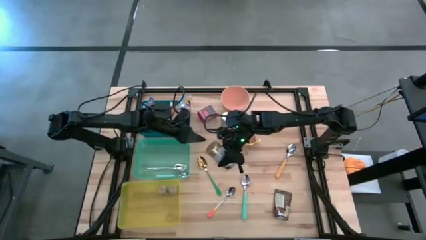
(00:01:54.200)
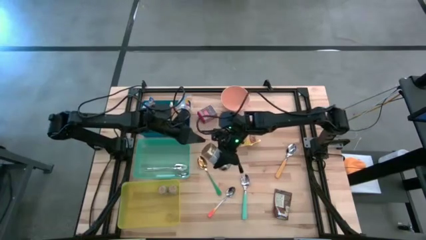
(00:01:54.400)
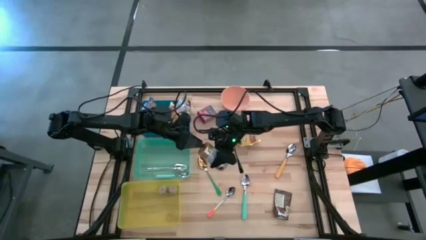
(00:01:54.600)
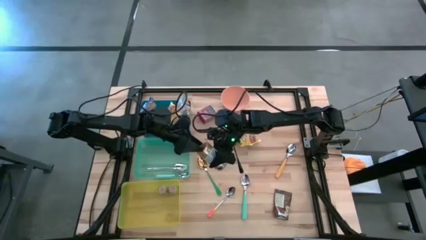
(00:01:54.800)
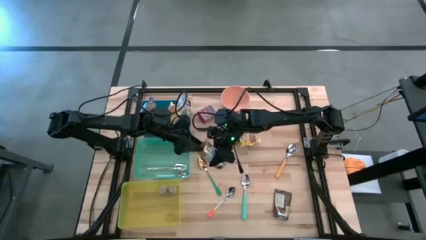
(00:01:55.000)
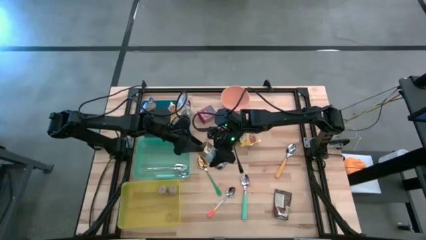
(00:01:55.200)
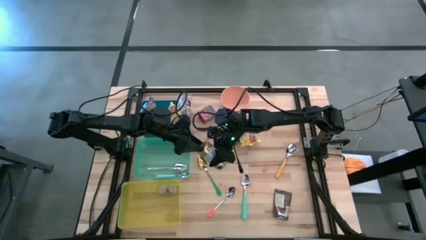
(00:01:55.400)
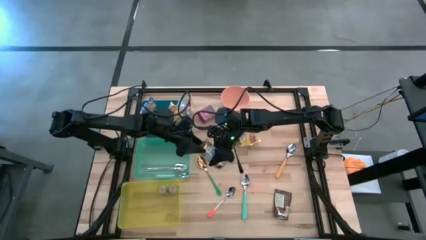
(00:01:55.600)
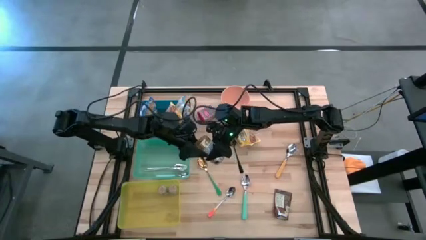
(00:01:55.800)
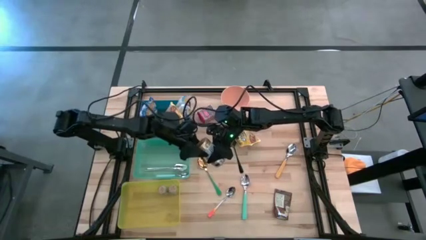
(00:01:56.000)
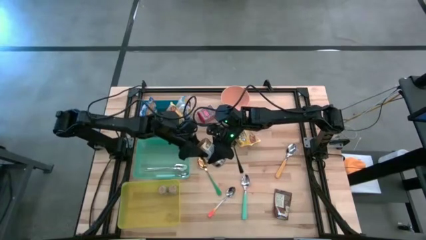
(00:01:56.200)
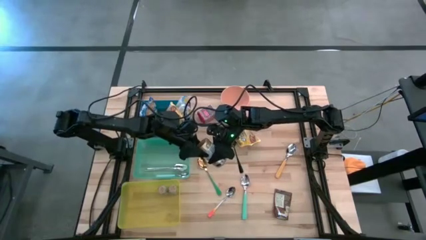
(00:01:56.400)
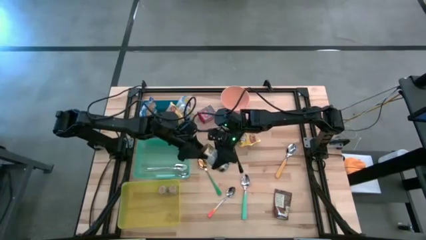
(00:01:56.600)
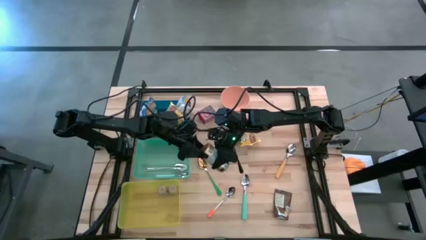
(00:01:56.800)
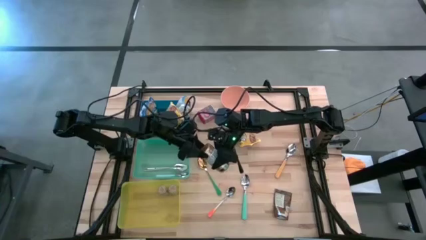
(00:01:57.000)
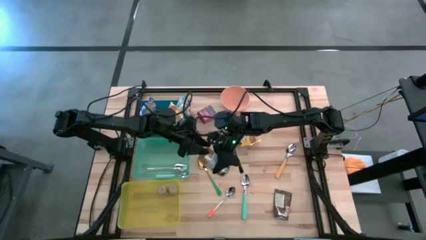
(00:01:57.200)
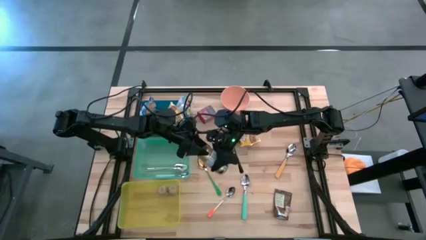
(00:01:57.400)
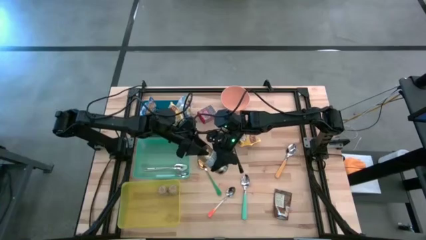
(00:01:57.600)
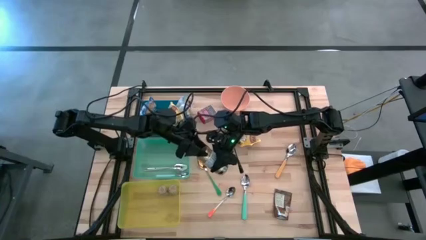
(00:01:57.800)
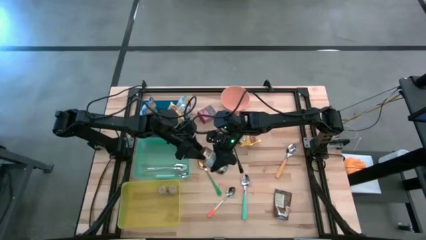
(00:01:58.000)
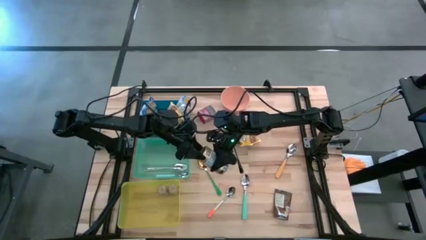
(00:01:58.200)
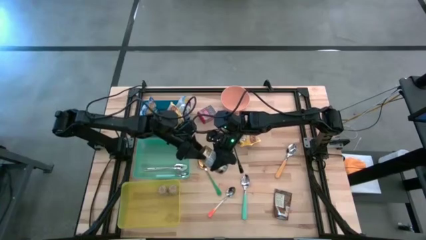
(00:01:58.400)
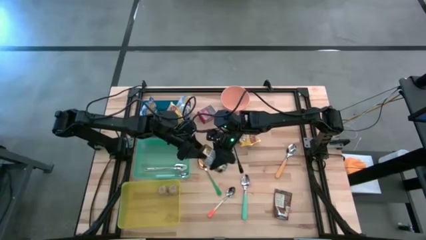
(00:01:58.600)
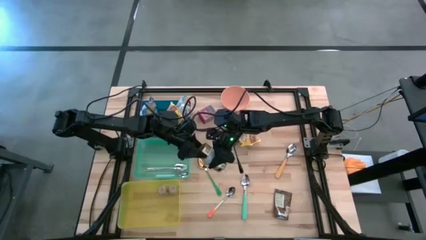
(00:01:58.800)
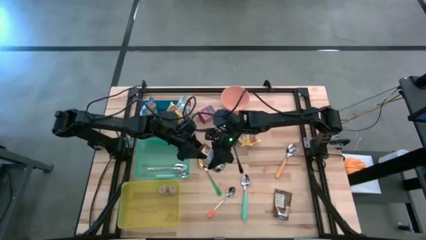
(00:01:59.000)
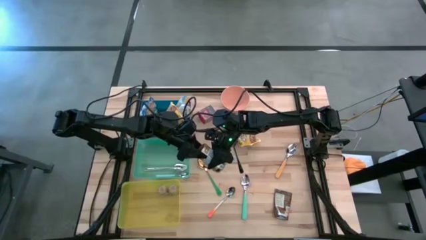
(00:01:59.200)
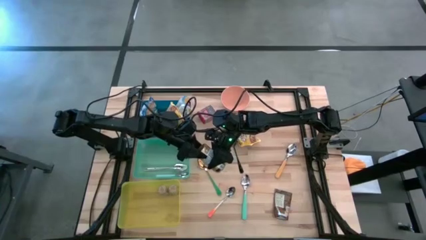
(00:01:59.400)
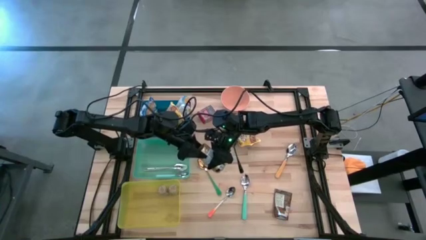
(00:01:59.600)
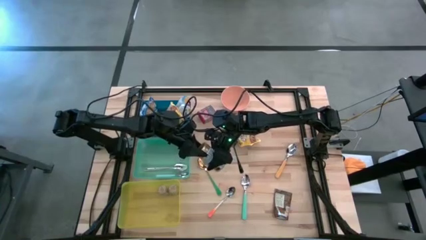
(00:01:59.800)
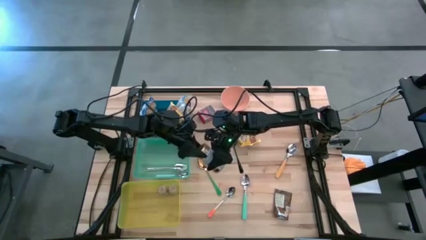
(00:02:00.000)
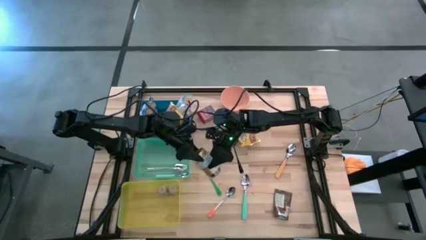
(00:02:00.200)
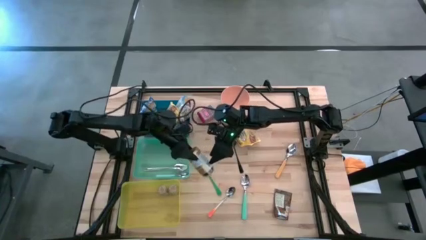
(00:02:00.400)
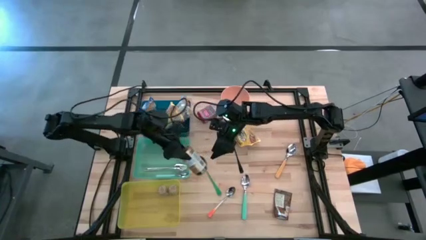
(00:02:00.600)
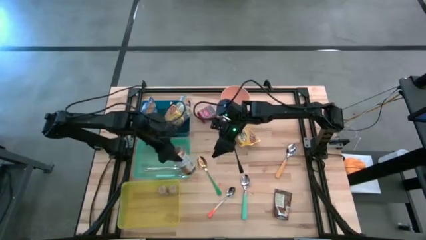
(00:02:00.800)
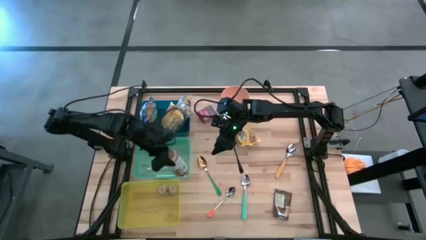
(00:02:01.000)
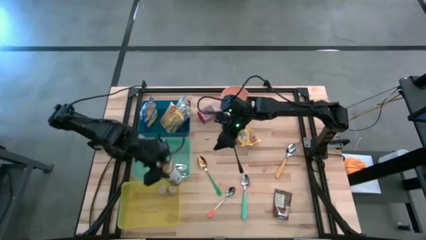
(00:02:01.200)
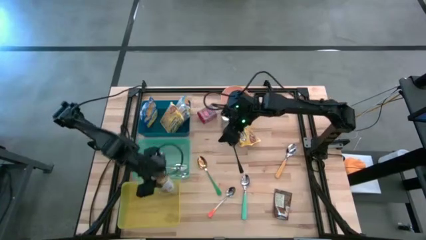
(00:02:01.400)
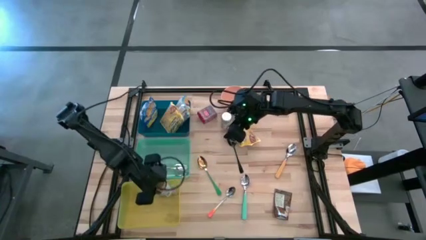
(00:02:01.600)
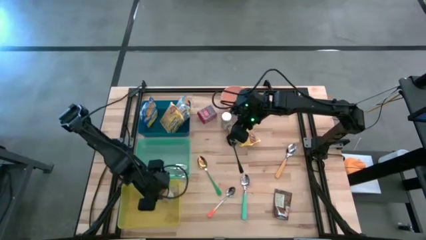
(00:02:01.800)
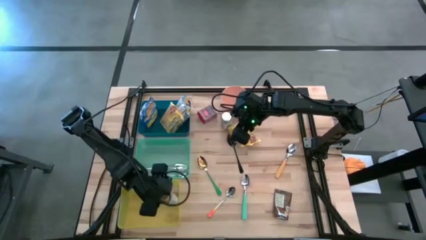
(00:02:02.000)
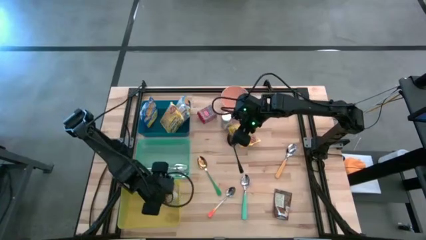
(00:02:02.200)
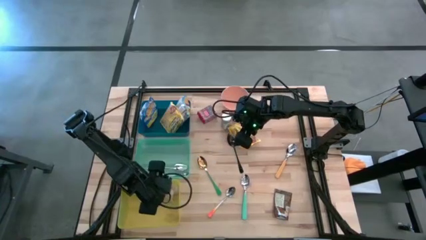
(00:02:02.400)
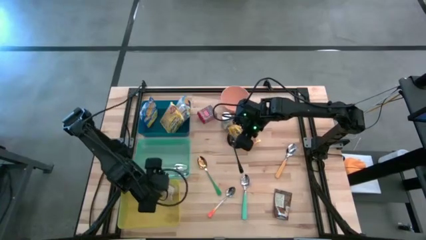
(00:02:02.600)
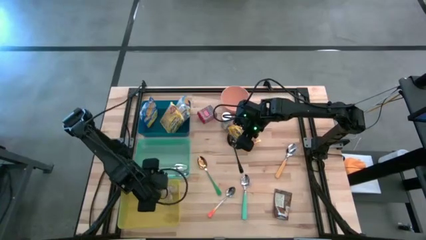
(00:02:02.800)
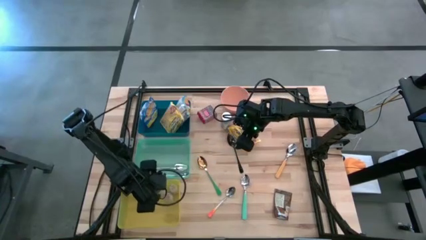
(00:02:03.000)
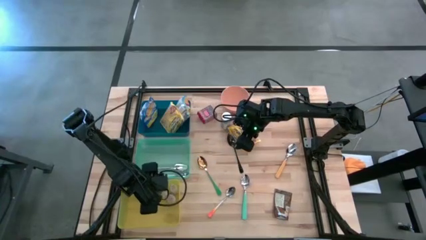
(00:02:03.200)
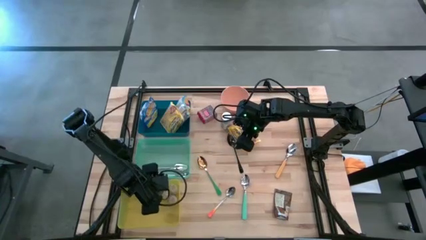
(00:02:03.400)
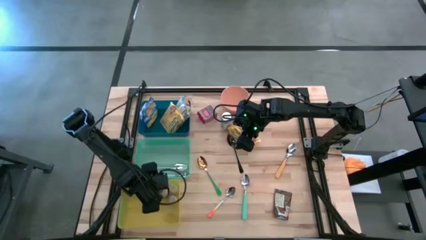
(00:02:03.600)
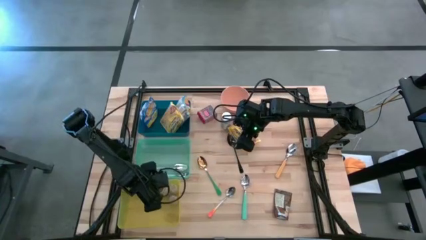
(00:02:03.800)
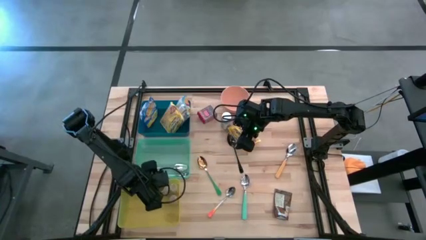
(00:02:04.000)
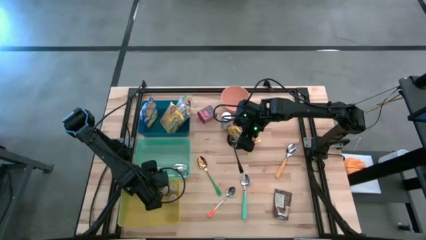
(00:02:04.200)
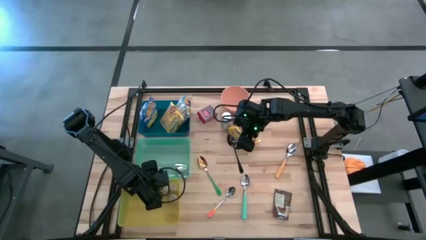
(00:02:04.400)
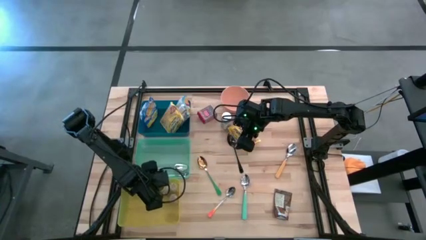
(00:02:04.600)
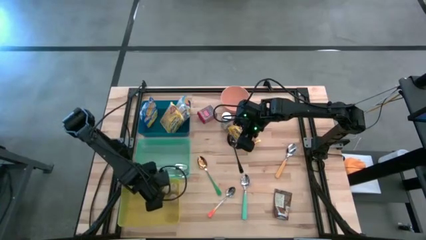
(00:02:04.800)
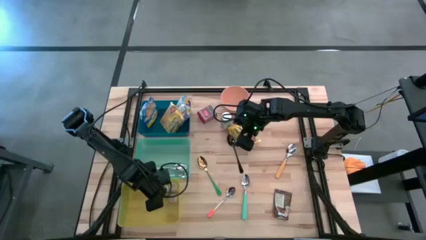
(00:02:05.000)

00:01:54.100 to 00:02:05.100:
Put the golden seasoning bottle into the yellow bin
